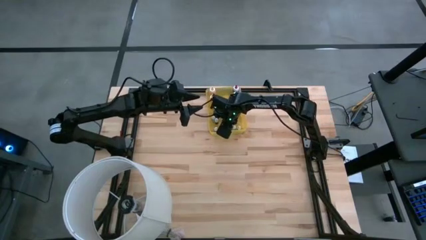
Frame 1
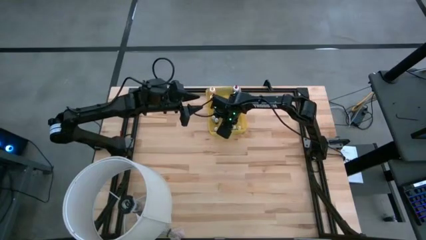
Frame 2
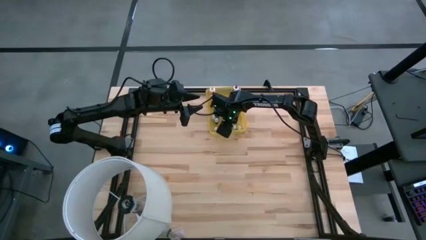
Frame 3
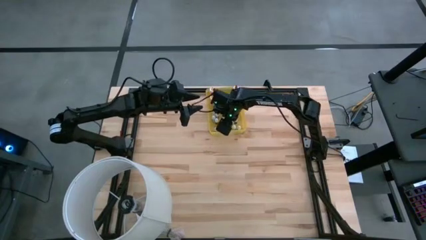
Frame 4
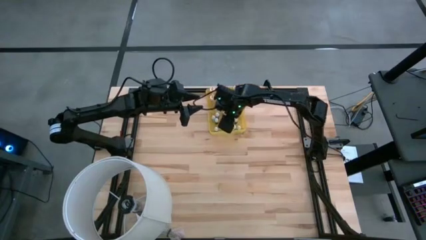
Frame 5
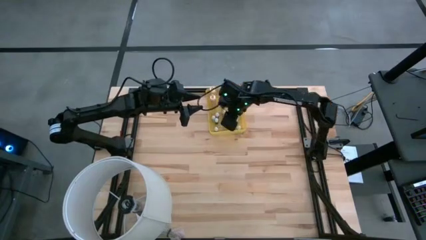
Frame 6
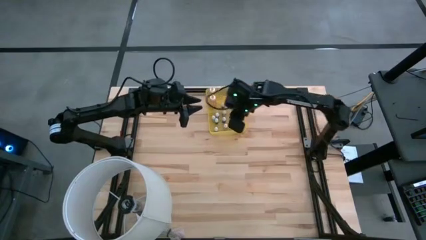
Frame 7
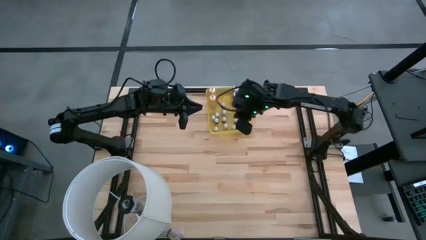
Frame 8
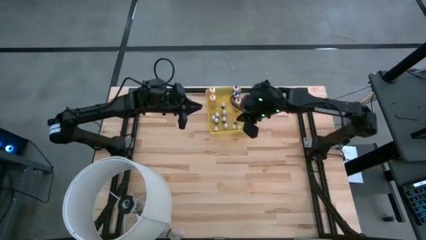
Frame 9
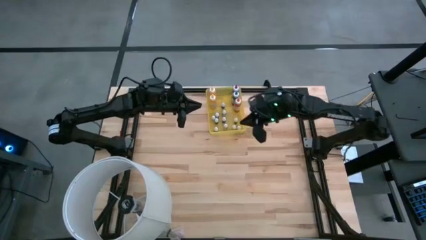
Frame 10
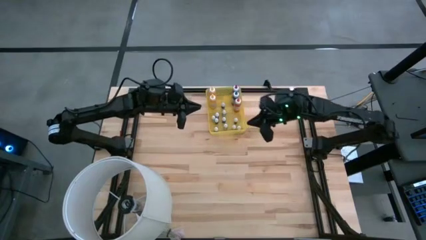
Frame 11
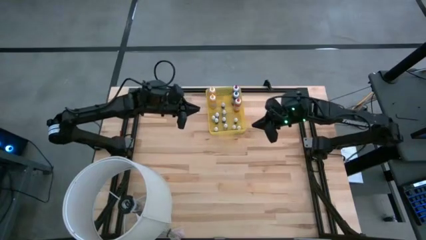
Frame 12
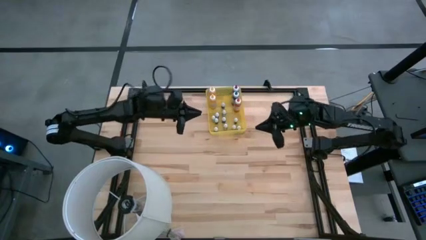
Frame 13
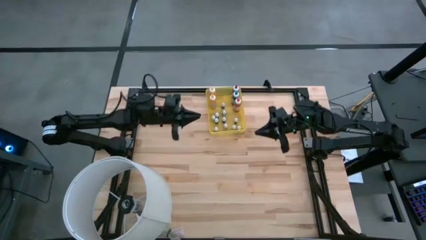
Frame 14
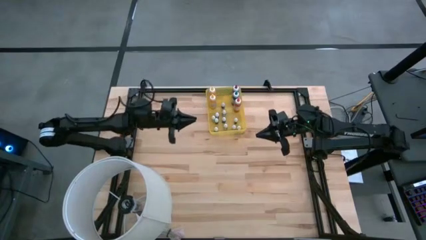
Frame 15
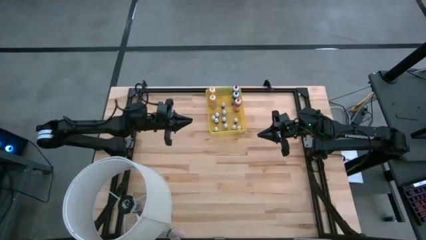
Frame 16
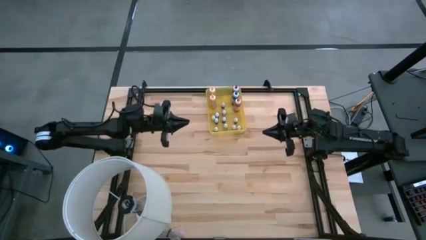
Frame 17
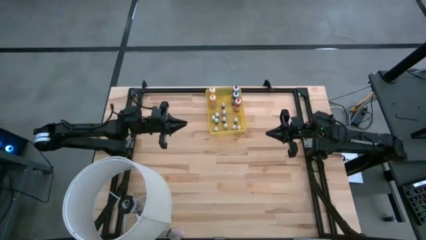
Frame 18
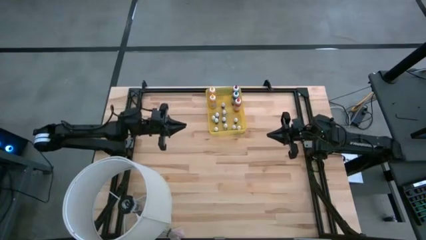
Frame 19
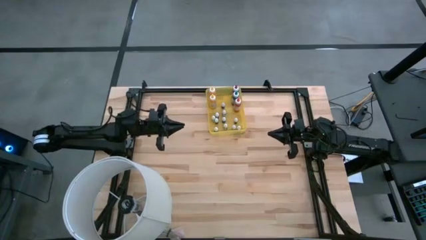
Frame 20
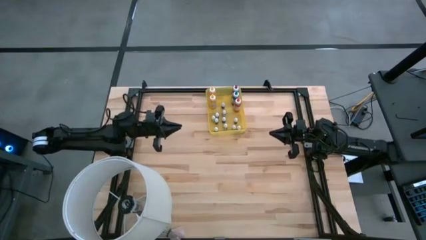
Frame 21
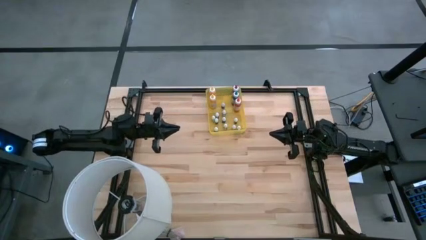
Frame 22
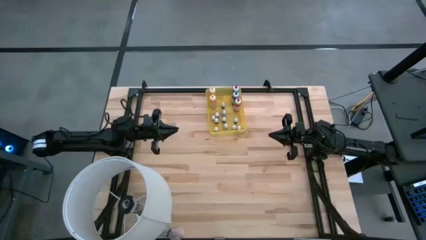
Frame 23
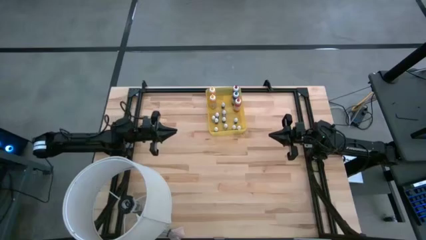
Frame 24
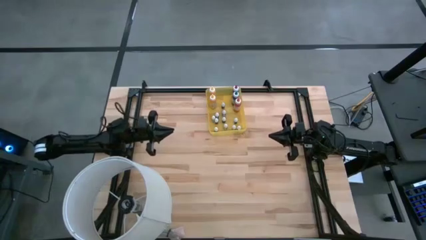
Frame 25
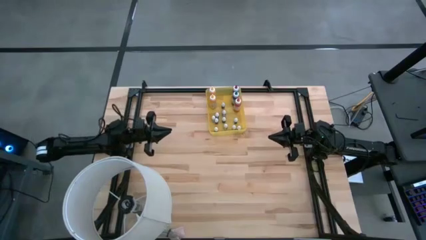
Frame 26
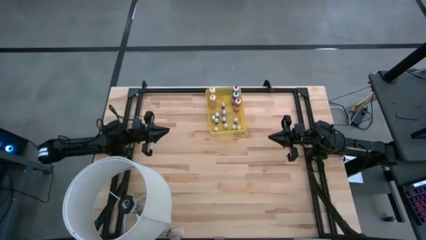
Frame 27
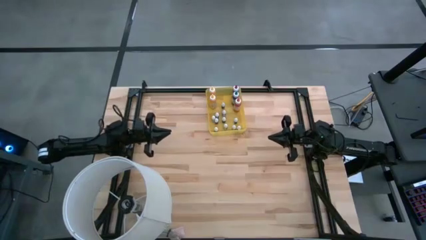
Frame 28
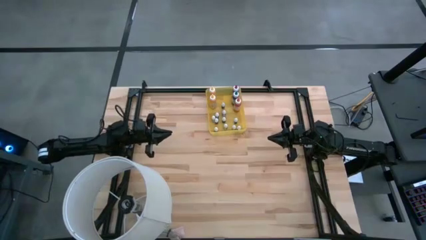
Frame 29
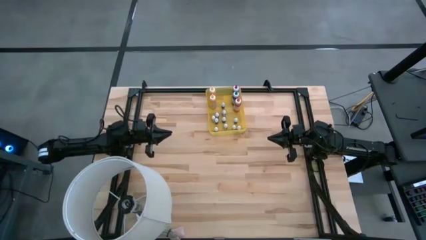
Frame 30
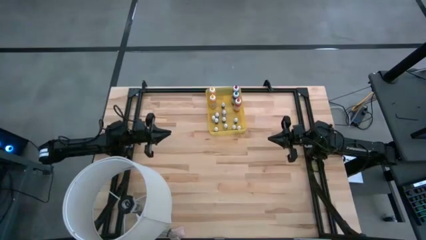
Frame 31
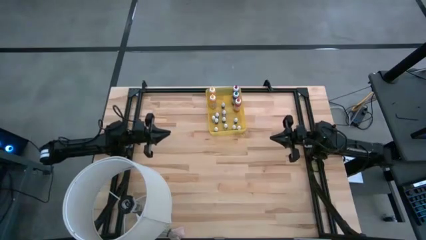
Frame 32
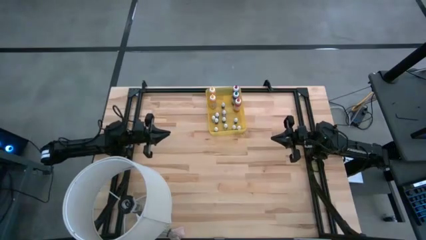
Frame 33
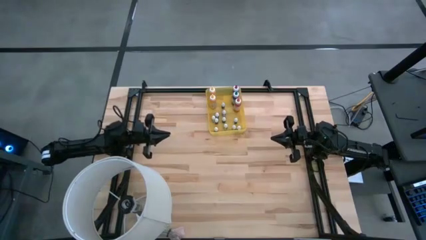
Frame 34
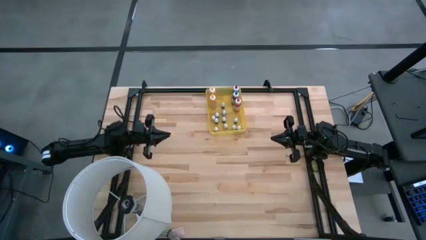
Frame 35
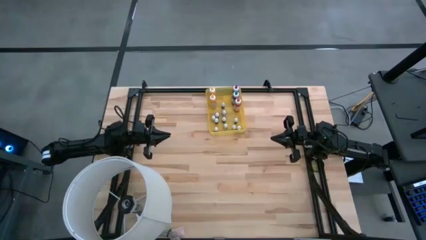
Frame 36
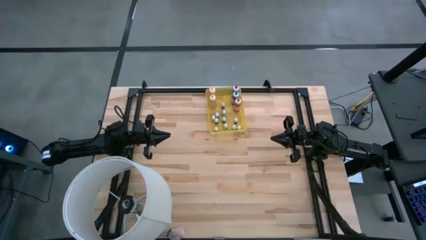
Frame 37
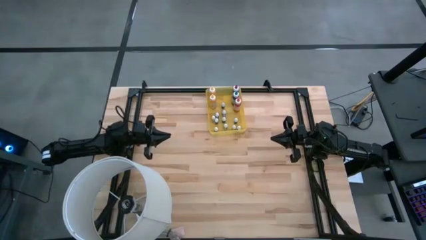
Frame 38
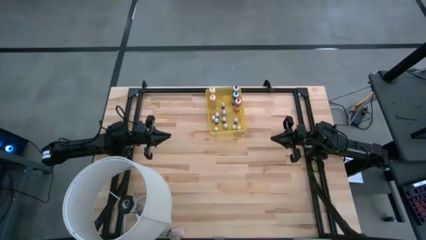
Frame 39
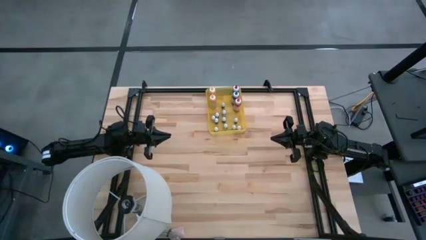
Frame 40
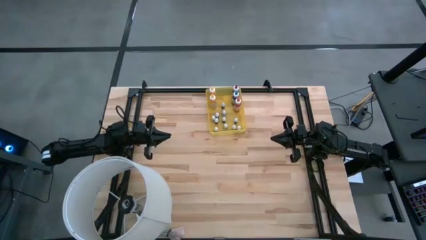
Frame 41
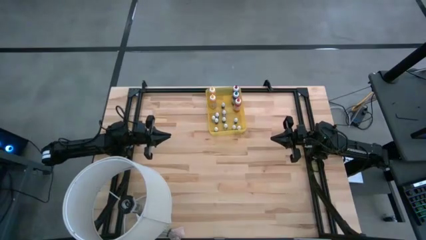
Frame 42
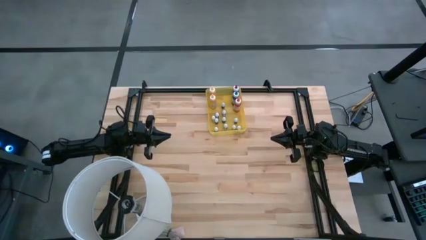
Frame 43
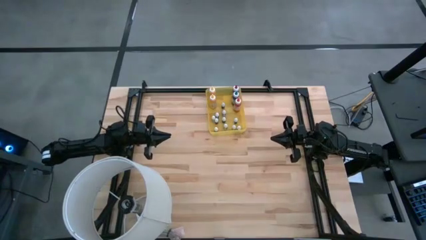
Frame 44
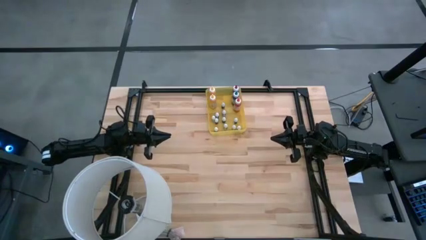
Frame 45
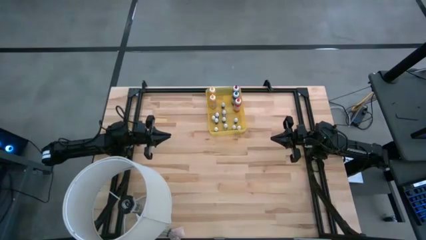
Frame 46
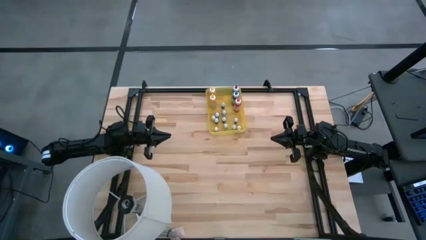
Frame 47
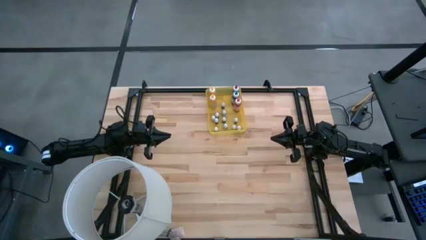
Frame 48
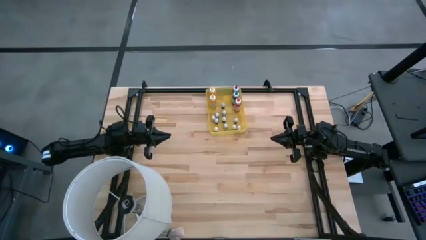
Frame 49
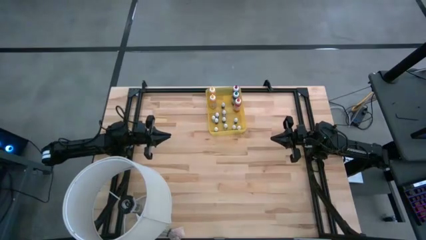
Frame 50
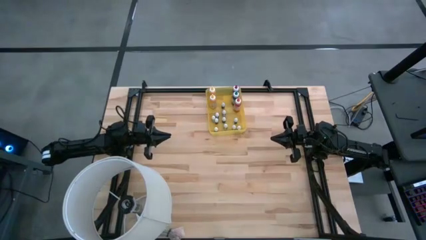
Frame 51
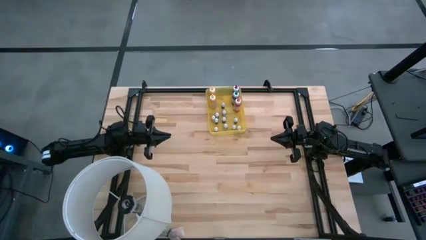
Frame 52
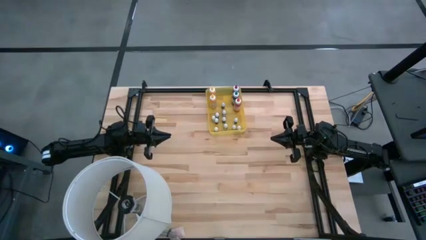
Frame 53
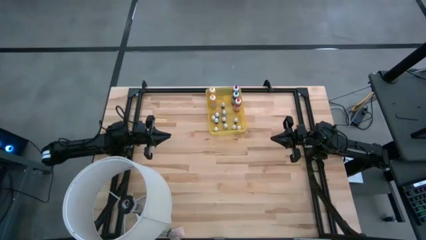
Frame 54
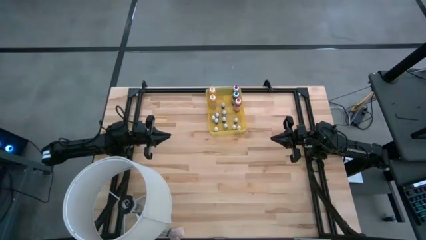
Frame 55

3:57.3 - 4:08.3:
Task: Pick & Place food coloring
Return to Home Position

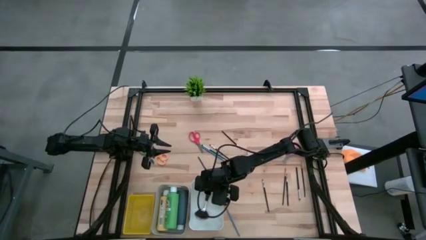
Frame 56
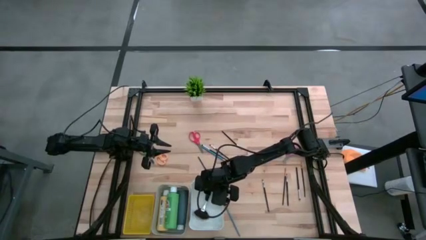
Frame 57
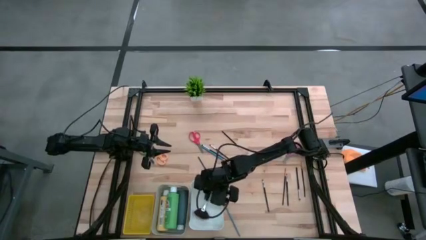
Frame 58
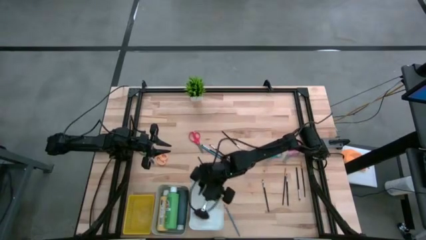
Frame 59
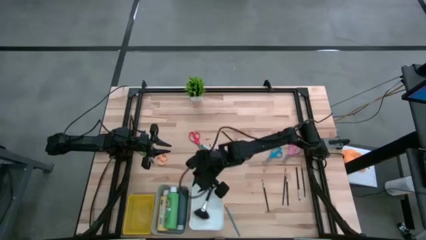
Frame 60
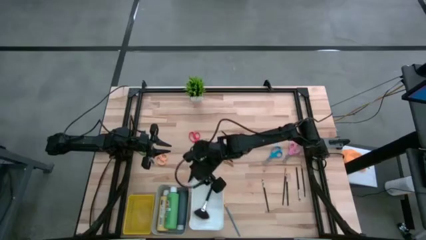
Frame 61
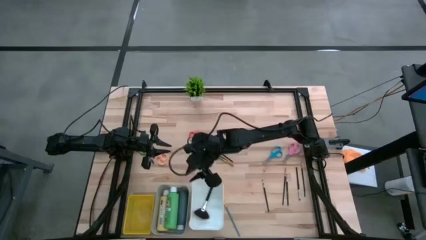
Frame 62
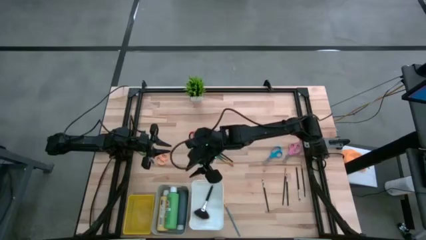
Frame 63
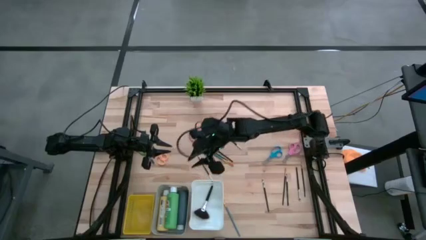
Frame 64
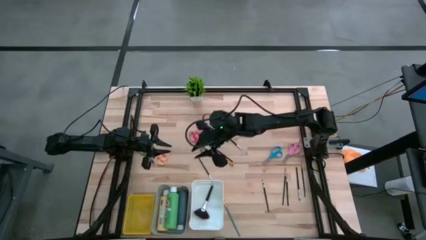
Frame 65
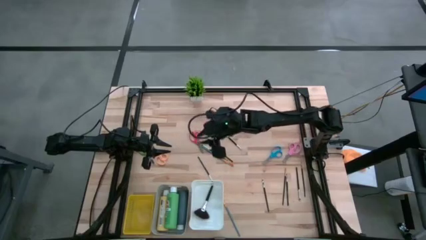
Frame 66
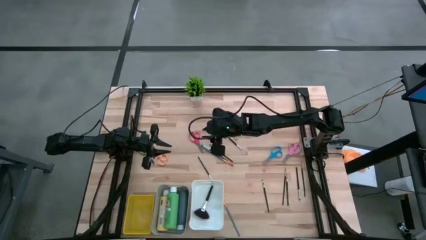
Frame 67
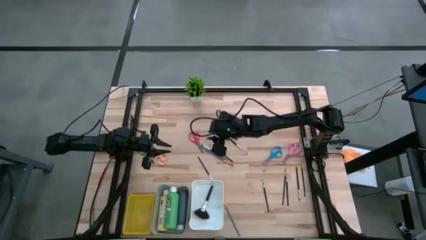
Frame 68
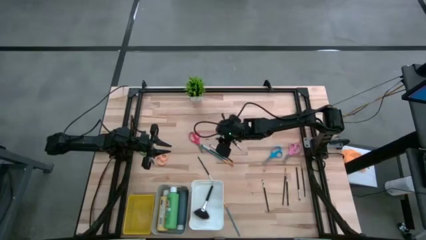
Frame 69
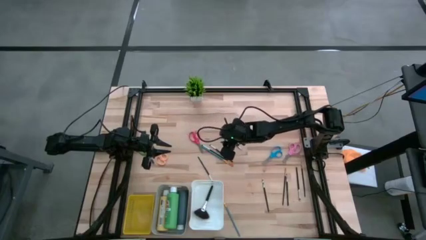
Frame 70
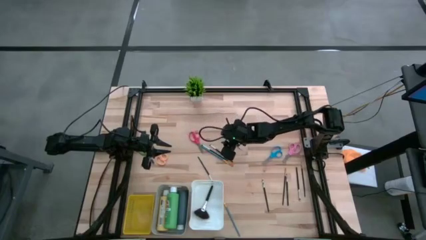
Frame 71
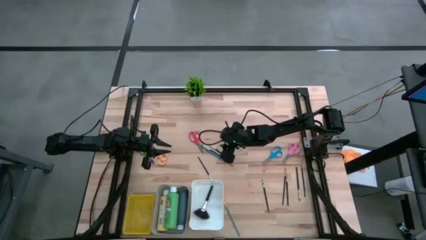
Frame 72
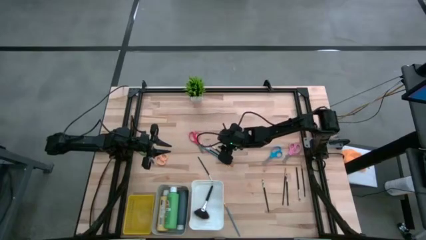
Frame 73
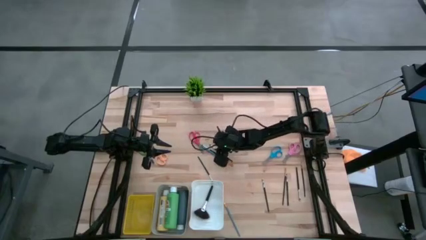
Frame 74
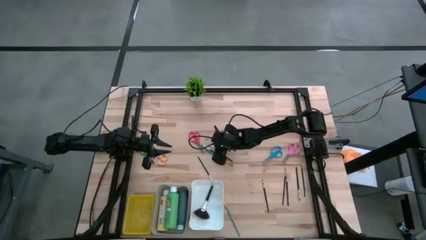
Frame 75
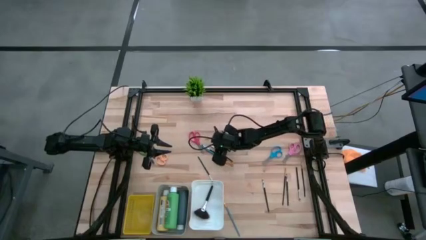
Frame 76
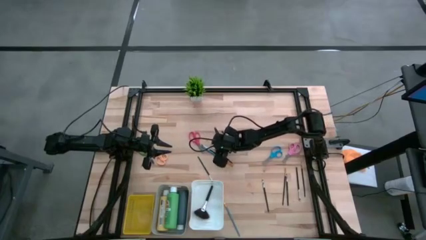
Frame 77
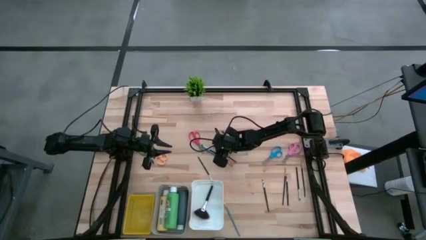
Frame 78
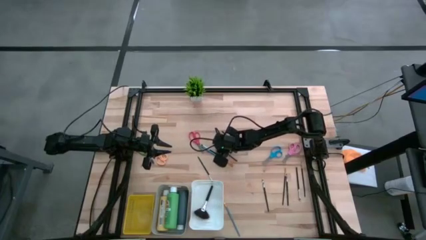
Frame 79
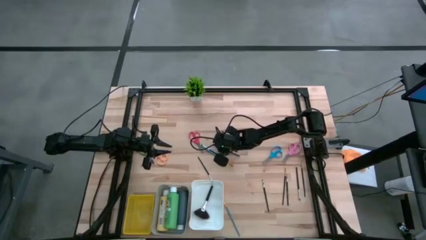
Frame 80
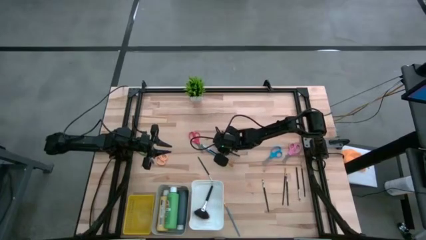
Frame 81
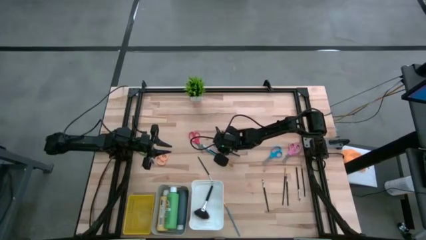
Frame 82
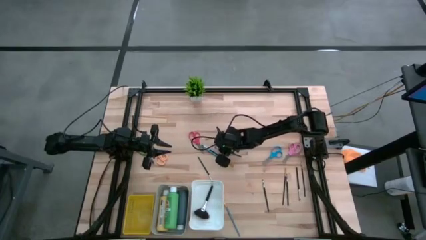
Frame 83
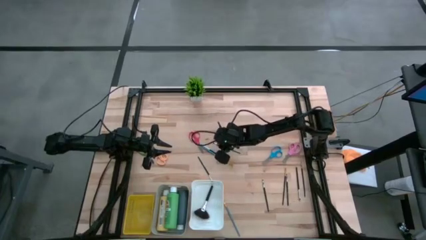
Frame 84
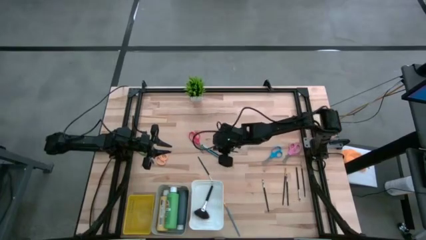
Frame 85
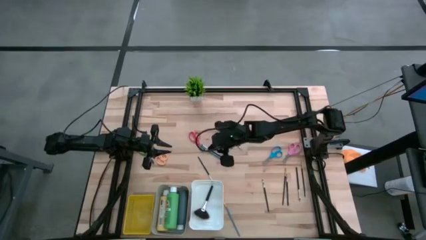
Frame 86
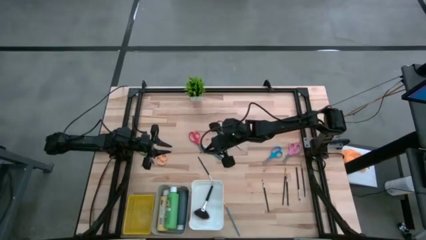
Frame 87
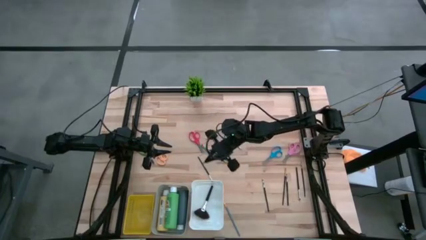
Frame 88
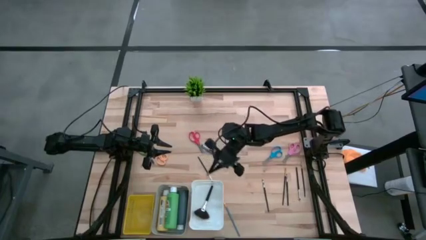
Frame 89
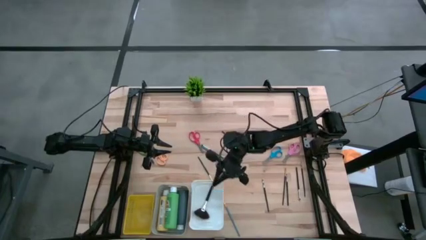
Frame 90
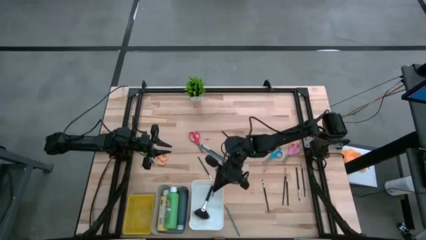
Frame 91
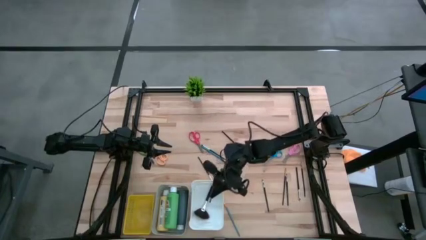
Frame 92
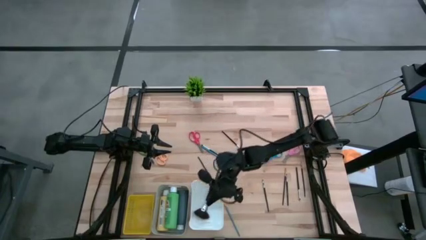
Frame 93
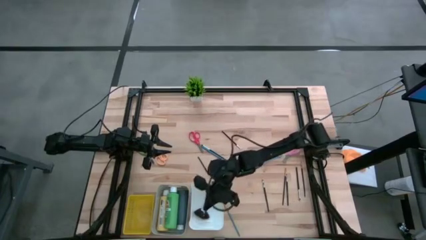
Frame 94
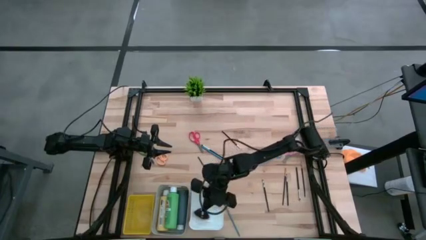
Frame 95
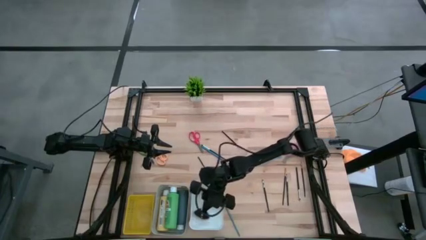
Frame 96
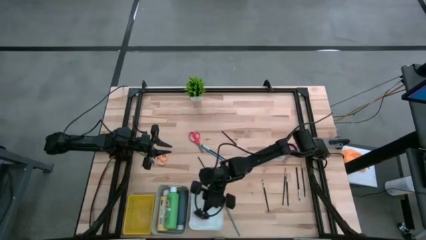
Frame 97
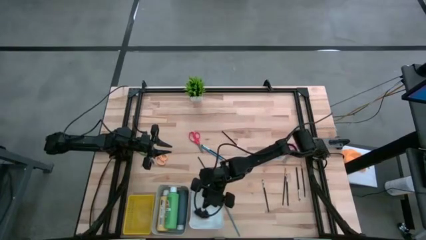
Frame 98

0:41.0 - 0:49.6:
Task: Pick & Place Paint Supplies
Put the black paint brush into the white bin
